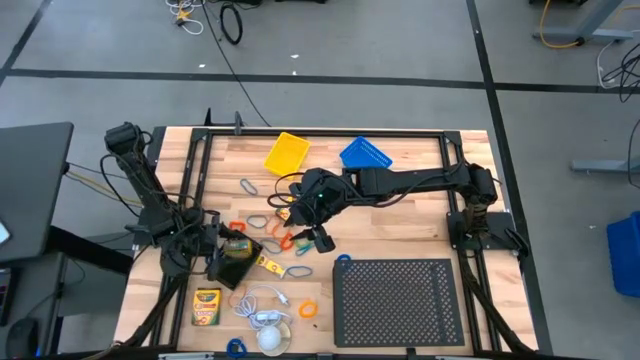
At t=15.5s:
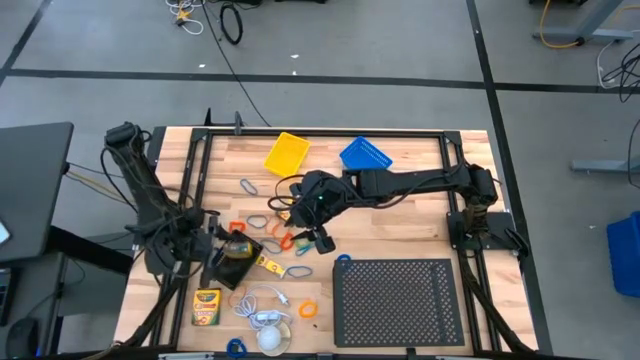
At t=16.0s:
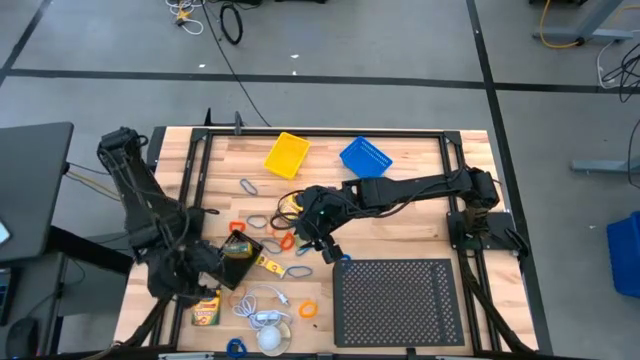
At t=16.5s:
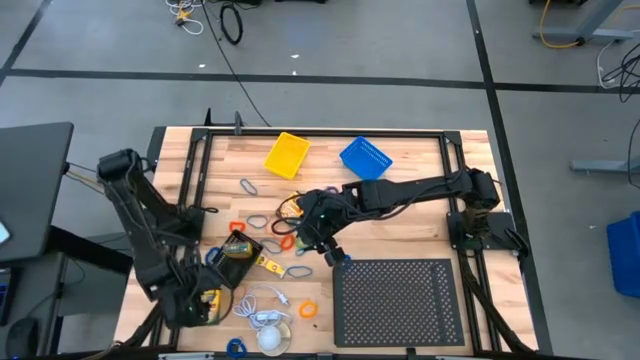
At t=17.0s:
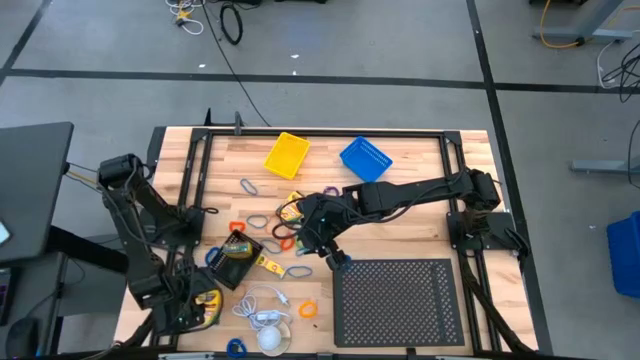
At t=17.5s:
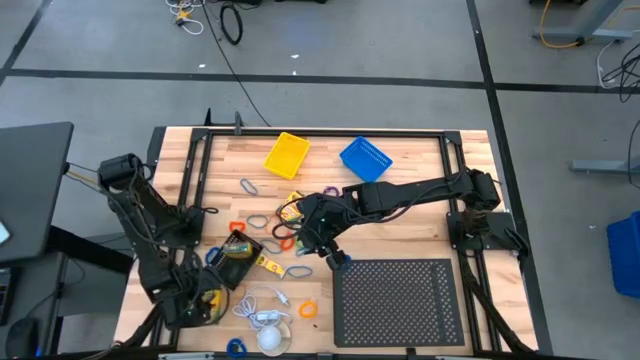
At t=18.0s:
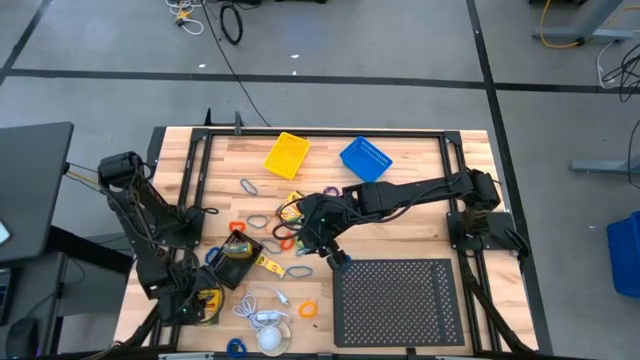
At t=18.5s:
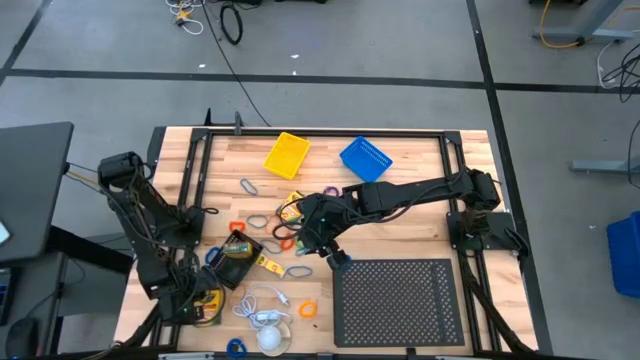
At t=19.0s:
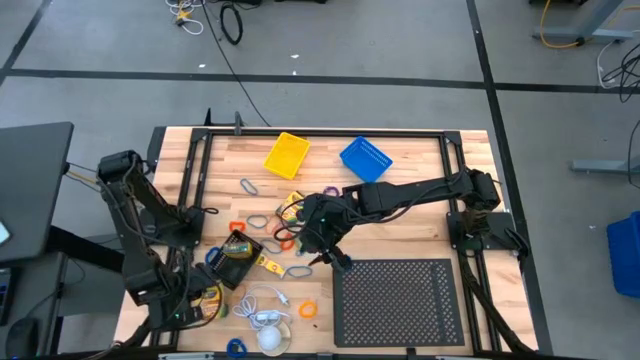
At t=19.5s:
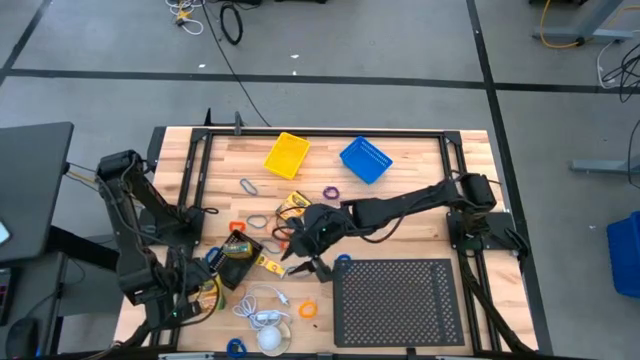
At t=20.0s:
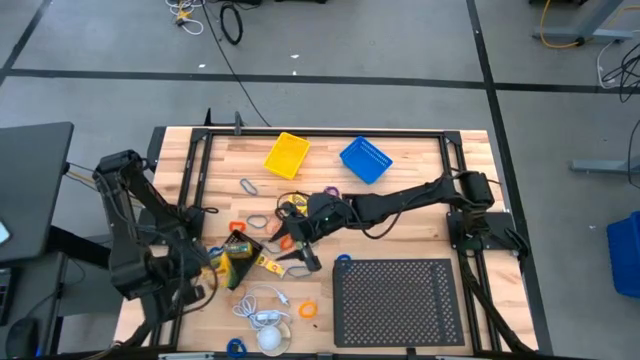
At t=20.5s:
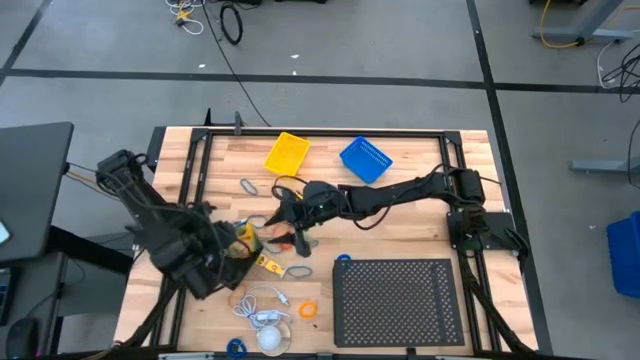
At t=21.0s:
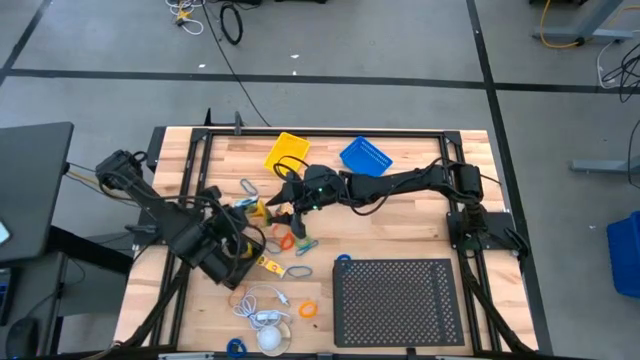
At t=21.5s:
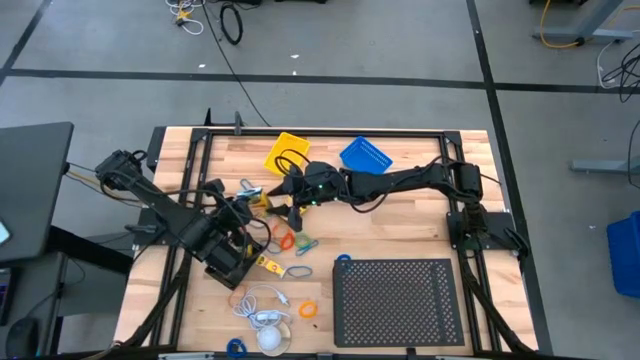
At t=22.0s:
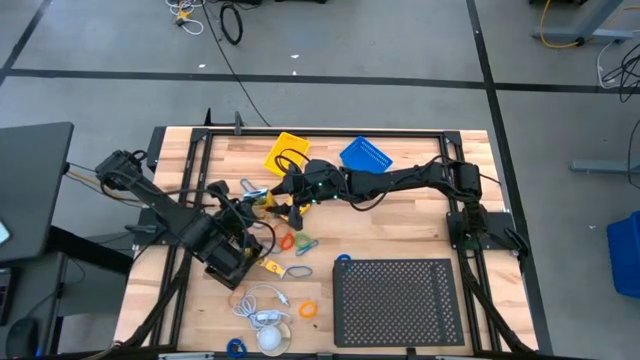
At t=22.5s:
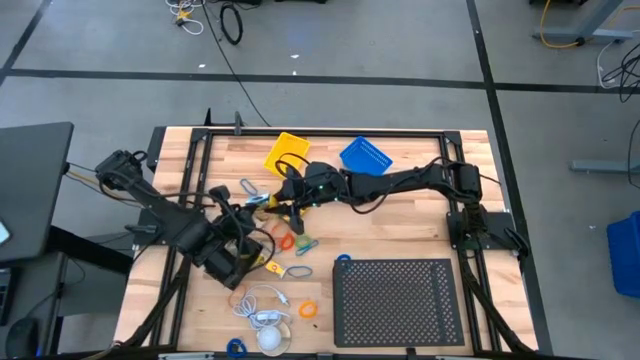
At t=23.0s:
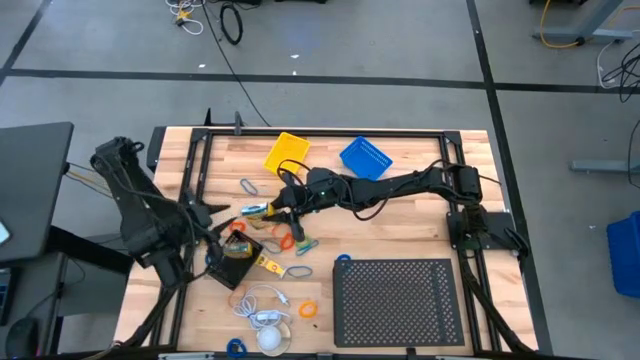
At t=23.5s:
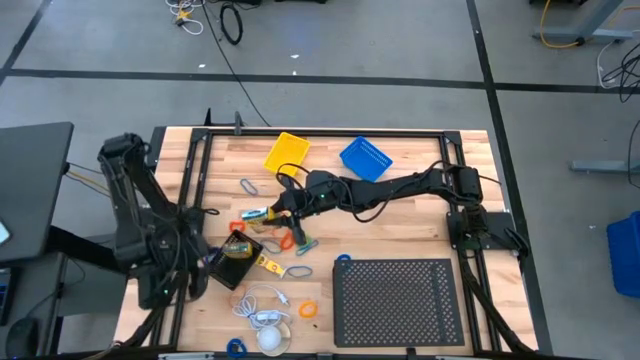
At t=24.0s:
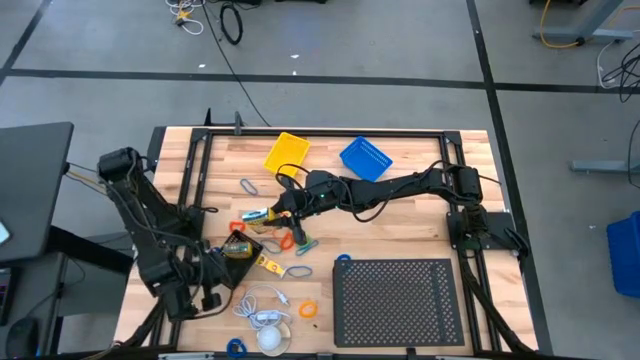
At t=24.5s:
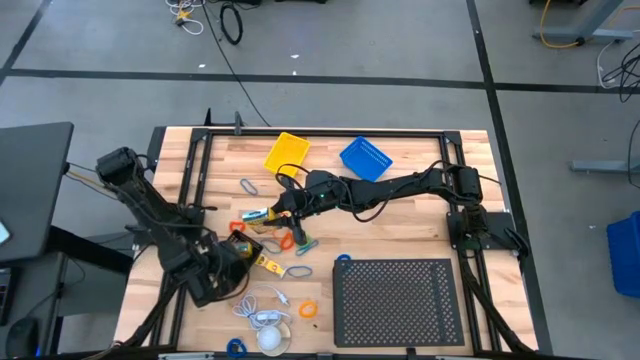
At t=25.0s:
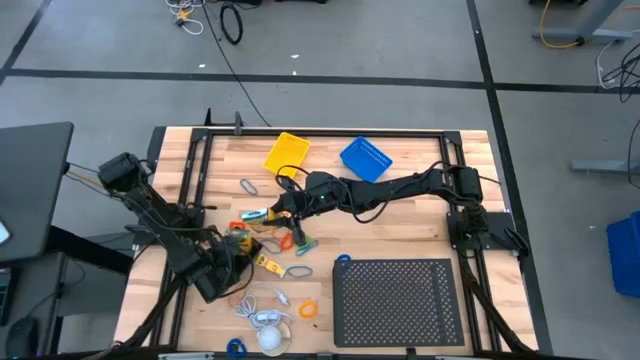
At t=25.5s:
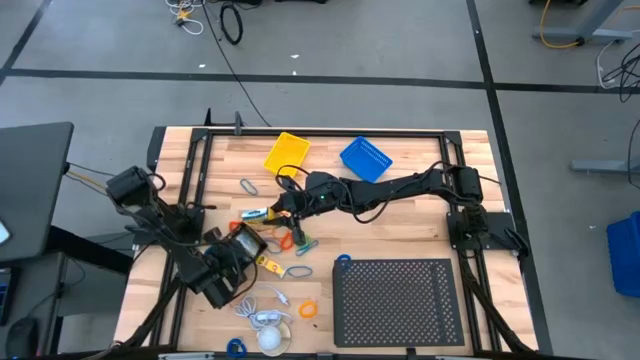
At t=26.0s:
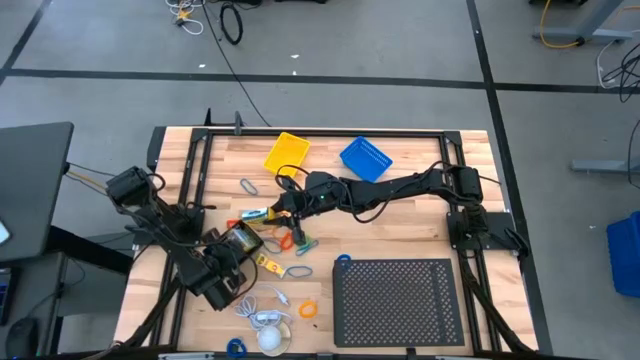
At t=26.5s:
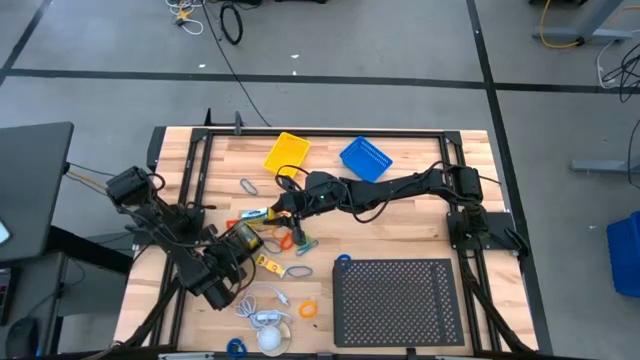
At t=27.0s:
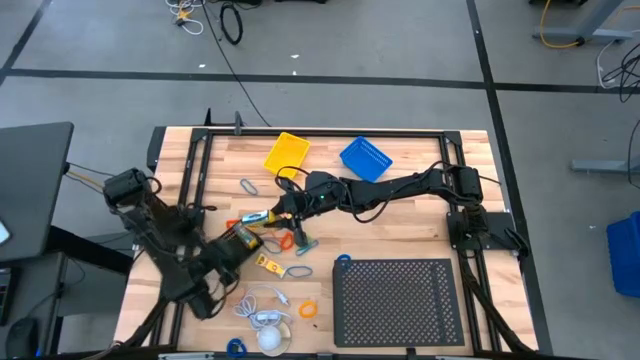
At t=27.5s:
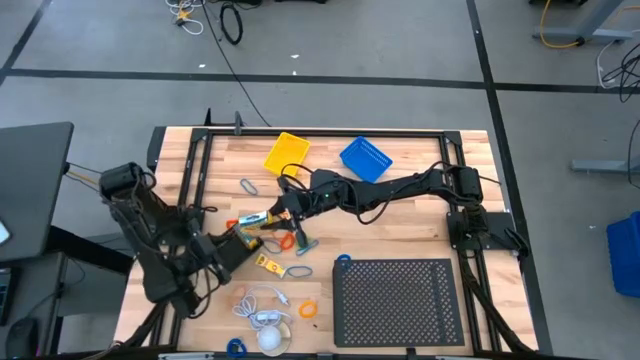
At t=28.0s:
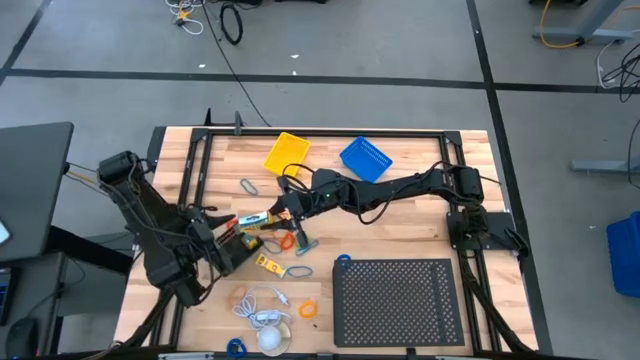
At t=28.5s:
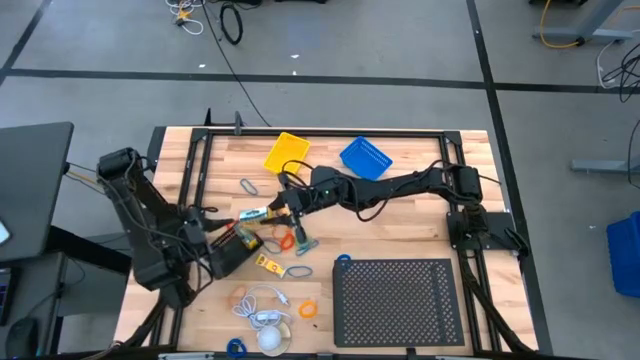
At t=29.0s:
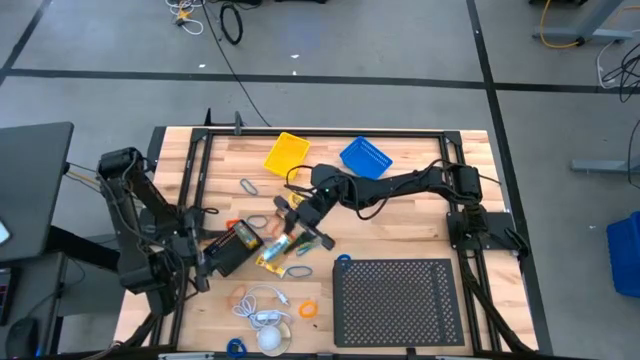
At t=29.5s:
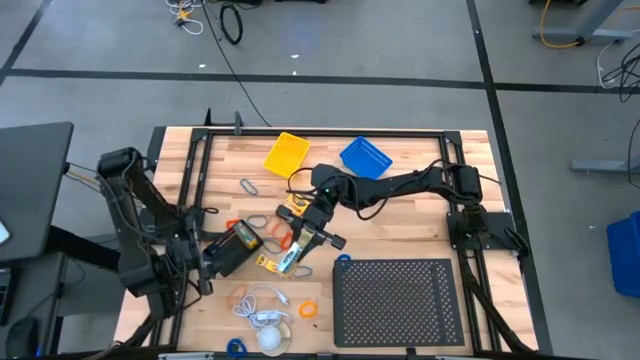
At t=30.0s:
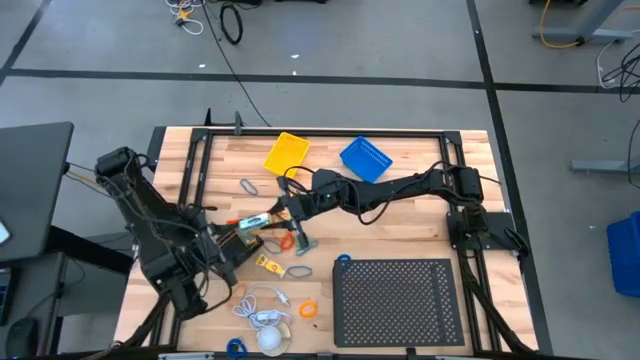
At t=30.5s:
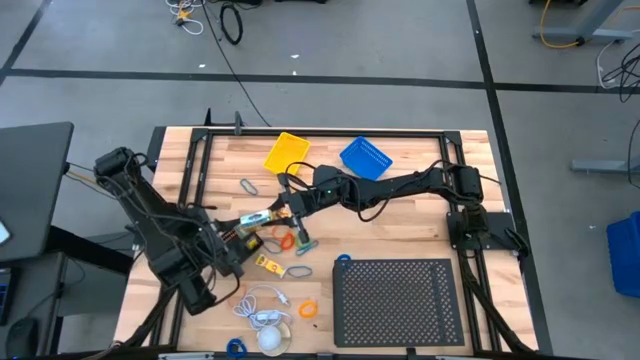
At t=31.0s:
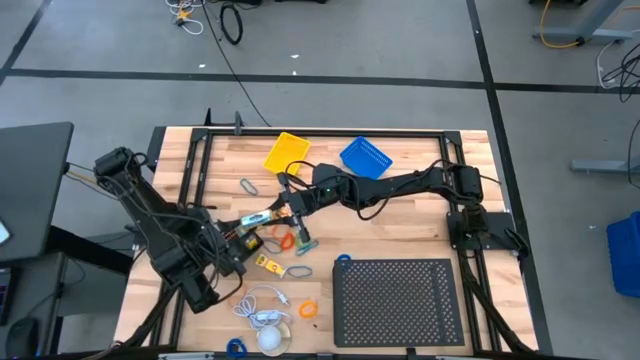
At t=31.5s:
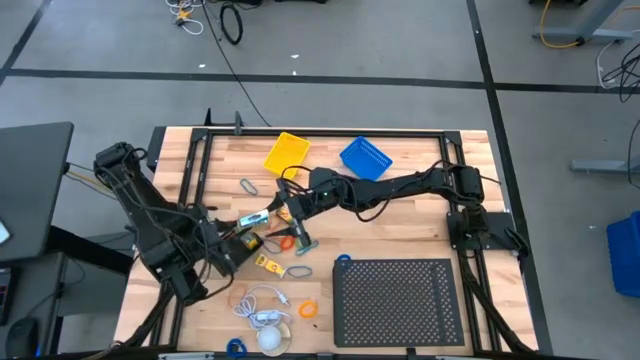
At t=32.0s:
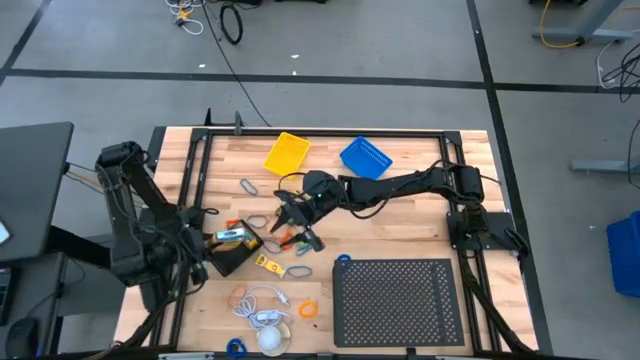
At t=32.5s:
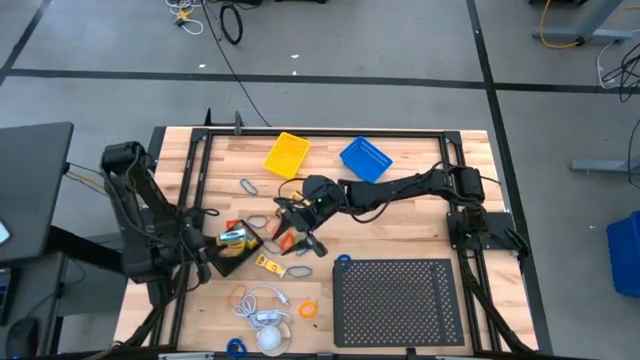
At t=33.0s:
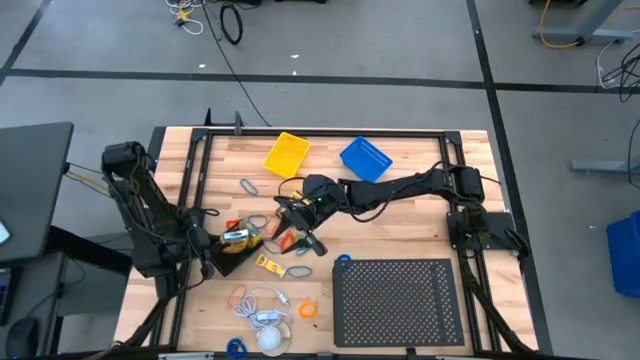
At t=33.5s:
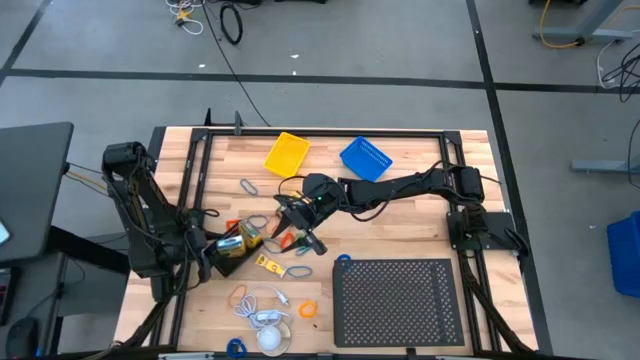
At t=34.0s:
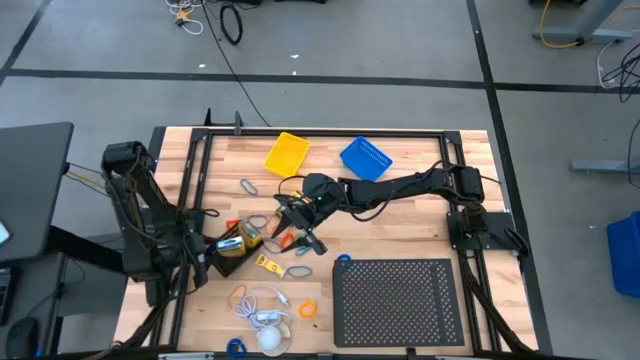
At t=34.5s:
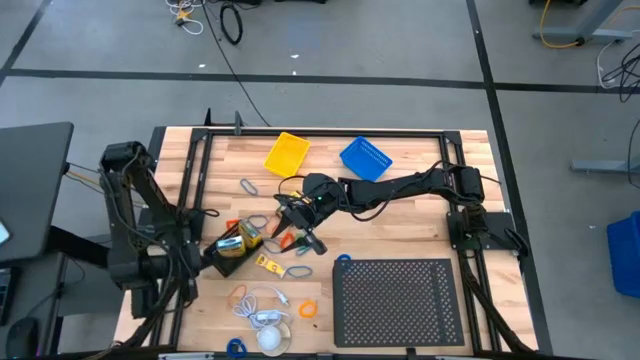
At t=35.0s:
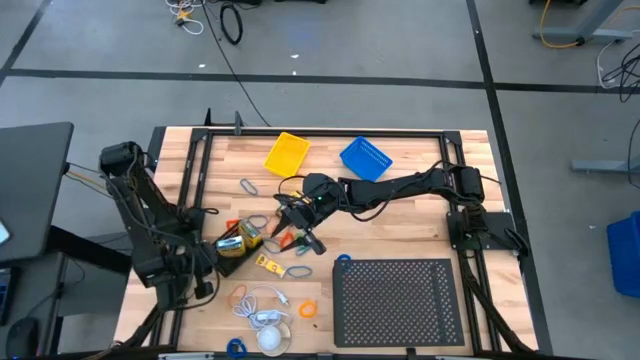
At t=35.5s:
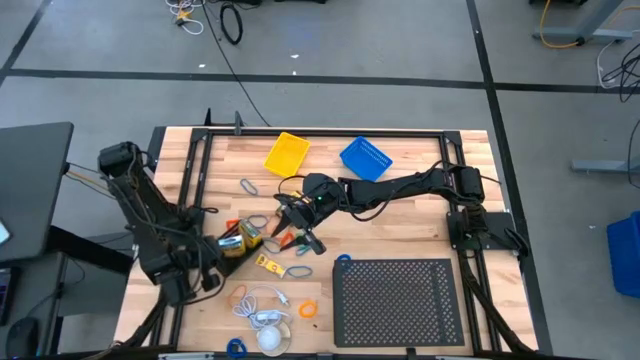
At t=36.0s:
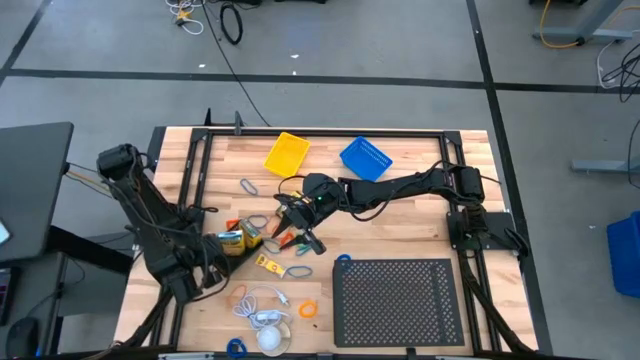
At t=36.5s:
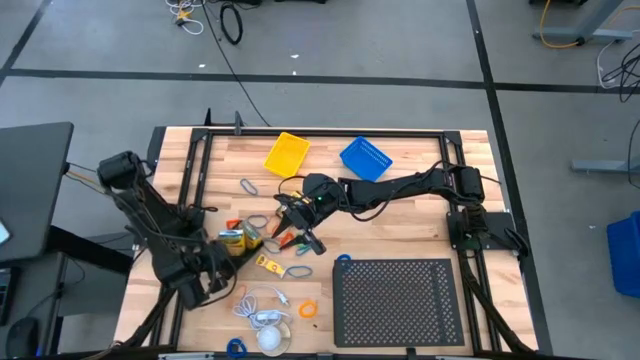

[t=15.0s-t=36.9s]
Task: Pick & Place Office Desk Supplies
Put the crayon box into the black basket
